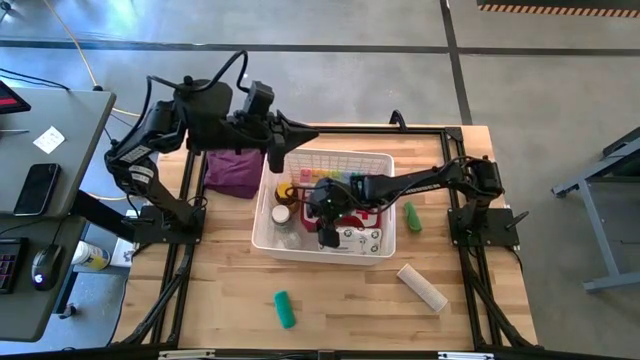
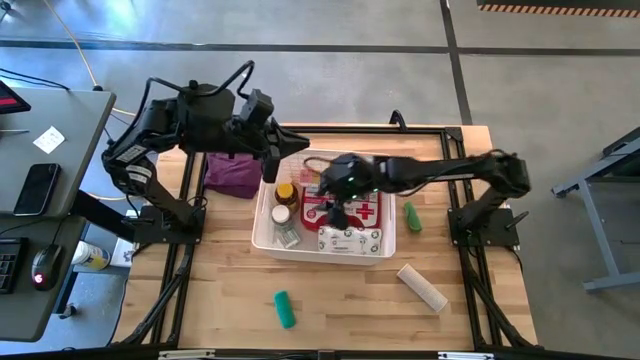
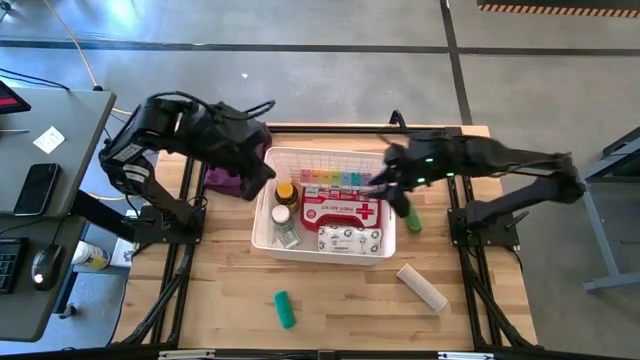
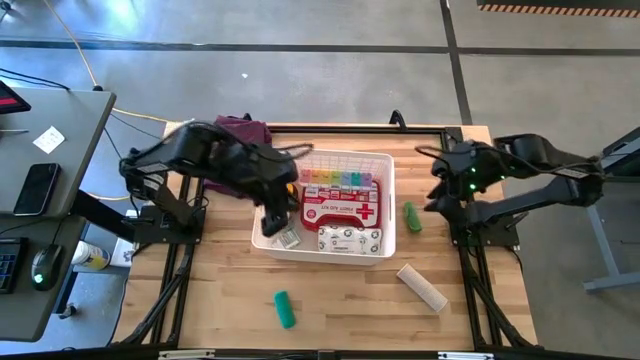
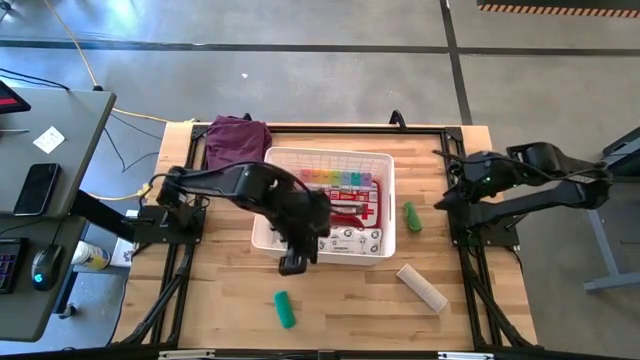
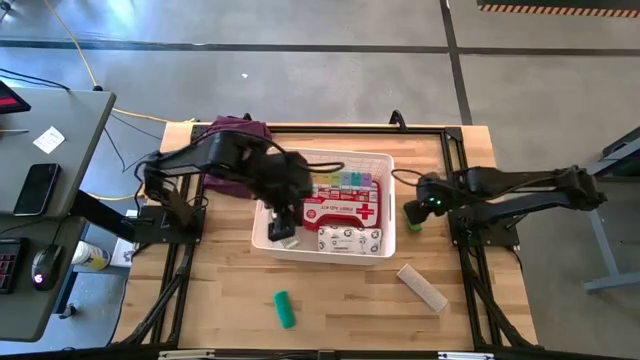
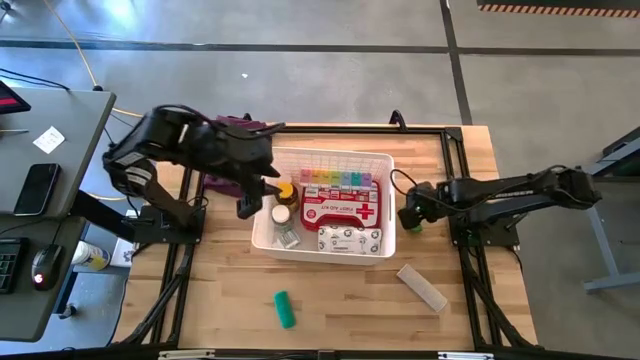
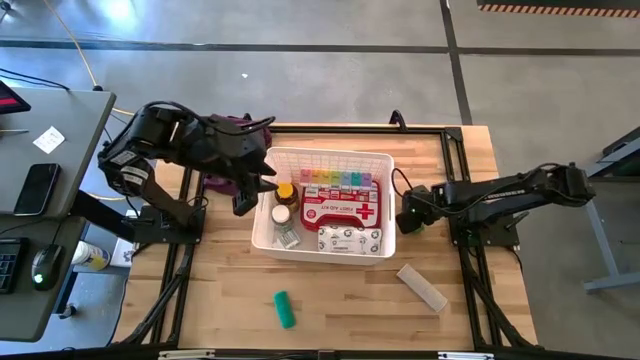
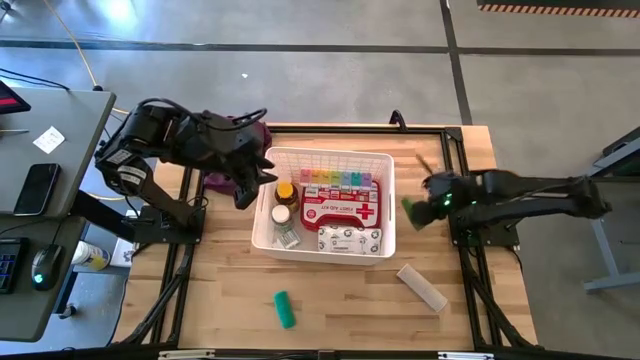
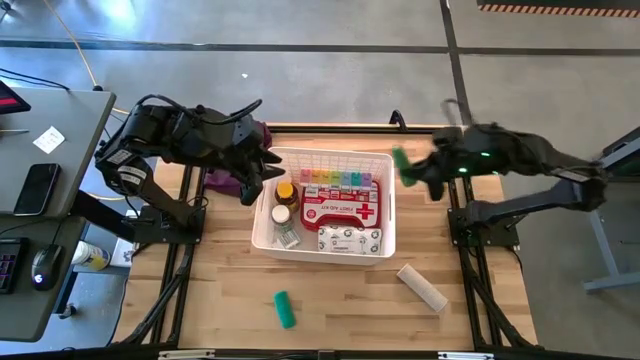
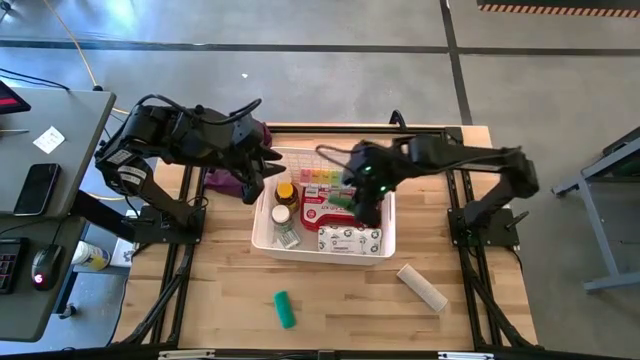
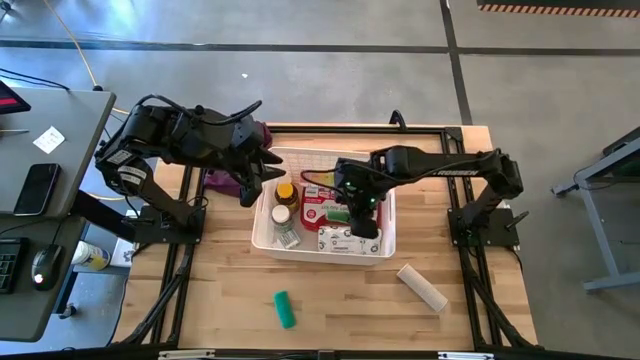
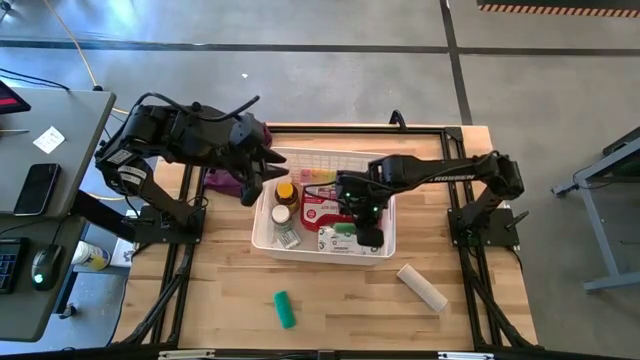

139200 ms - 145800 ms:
Task: Pick & place medical supplies in basket/bin
Put the light green bandage into the white bin

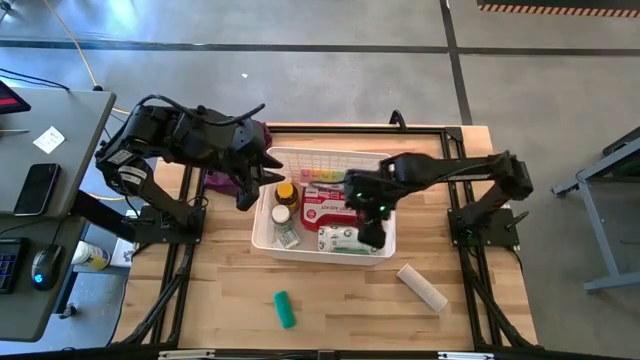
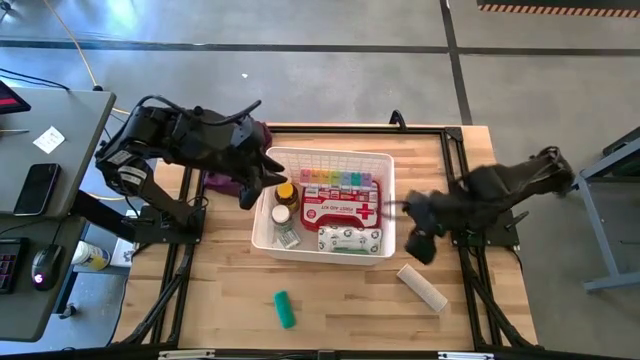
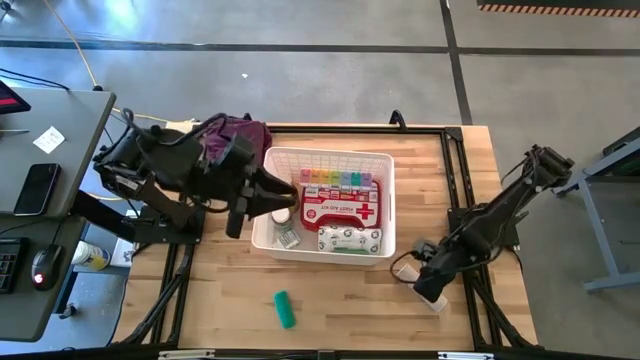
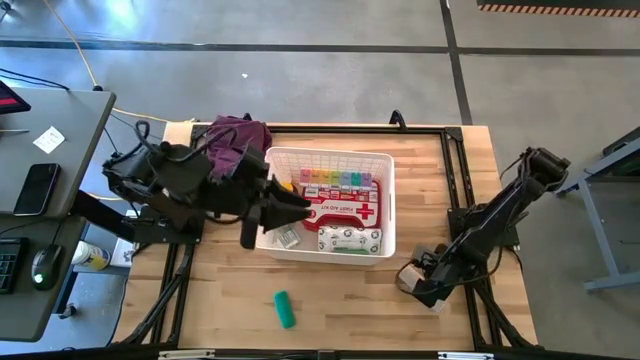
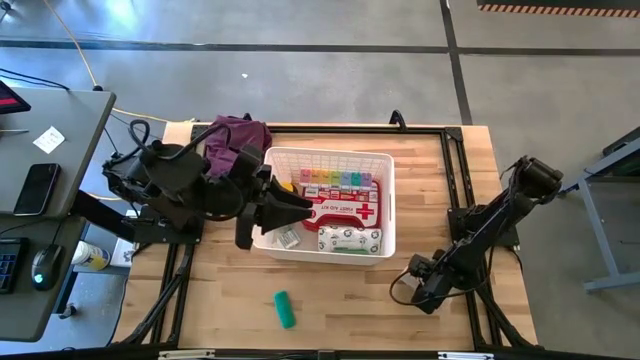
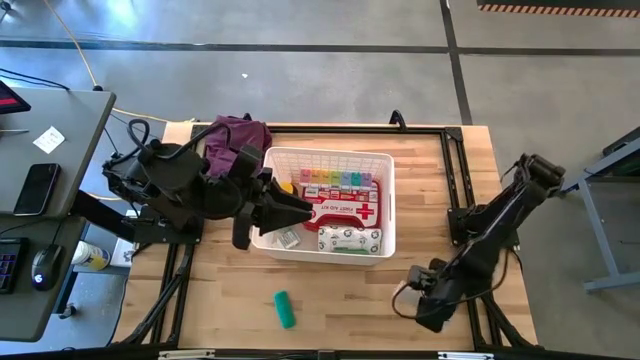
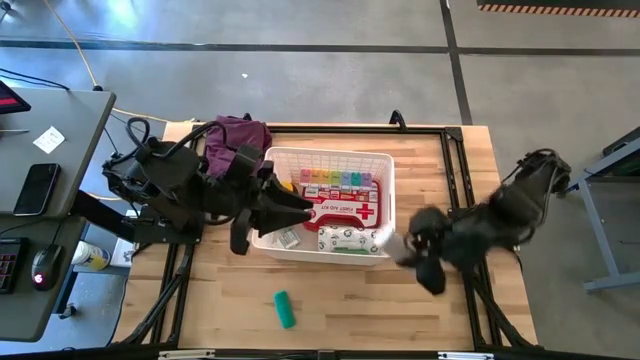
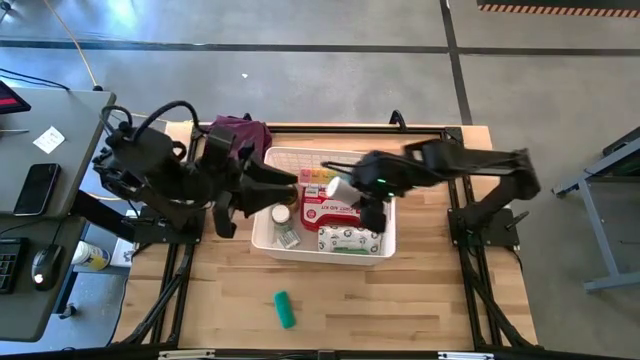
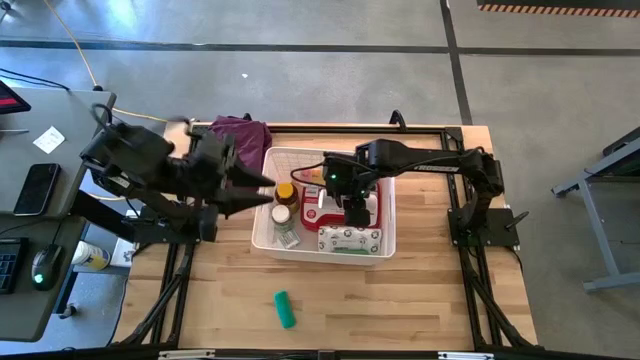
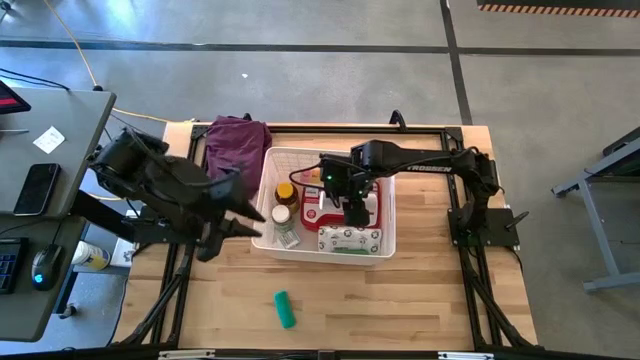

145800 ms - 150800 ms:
Put the white bandage into the white bin

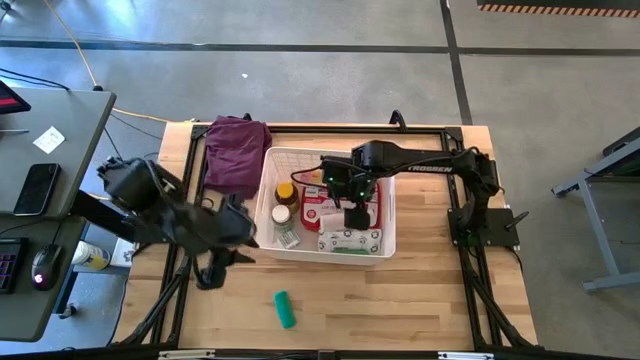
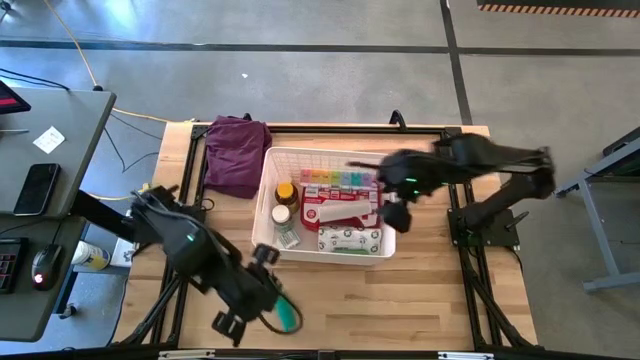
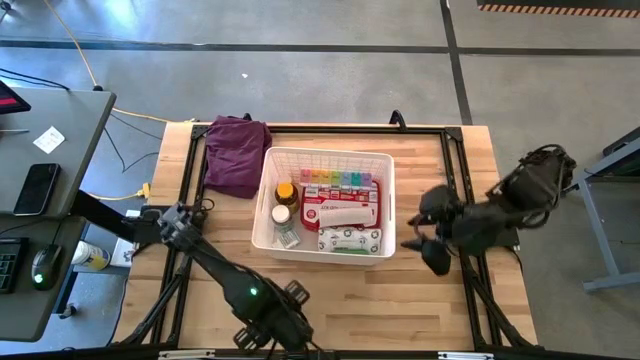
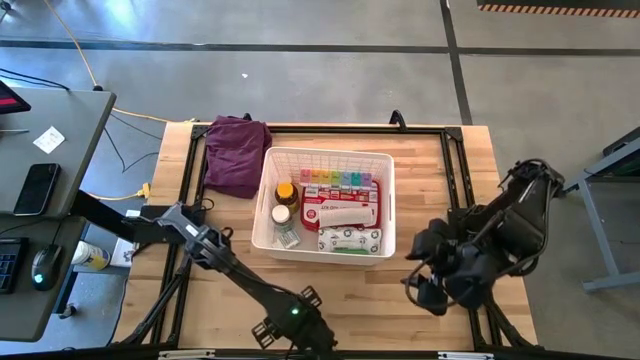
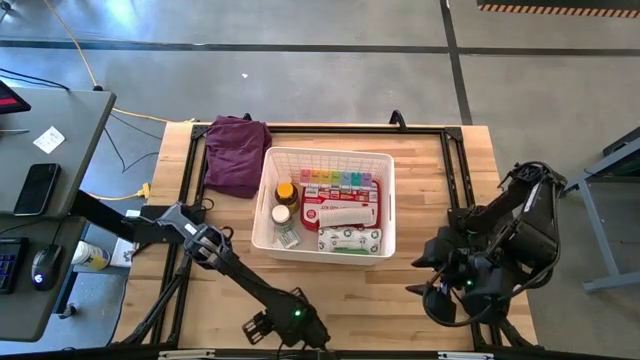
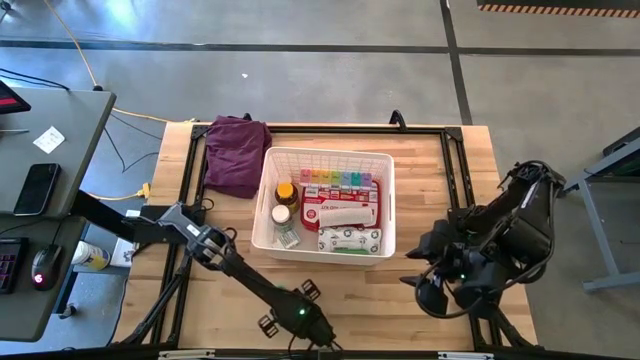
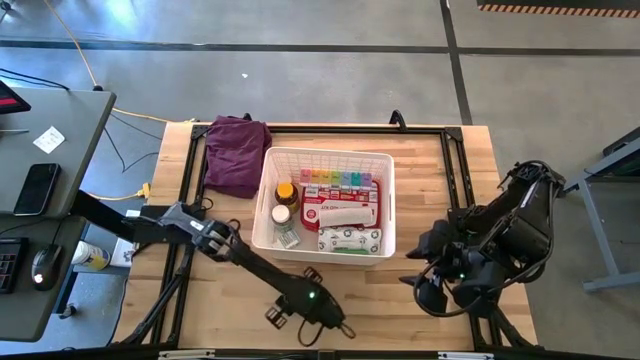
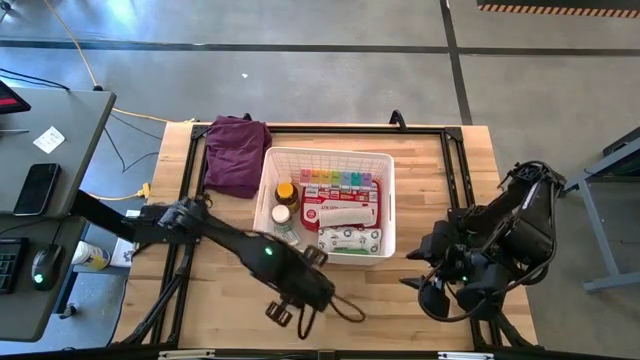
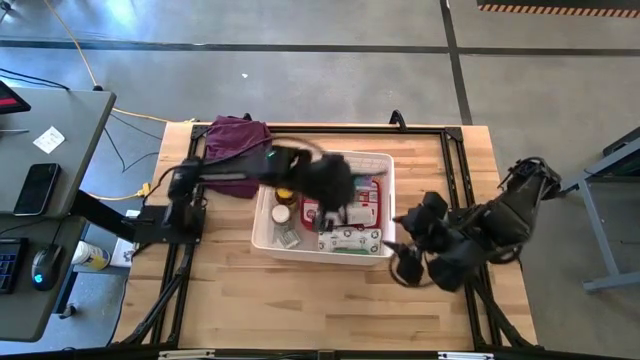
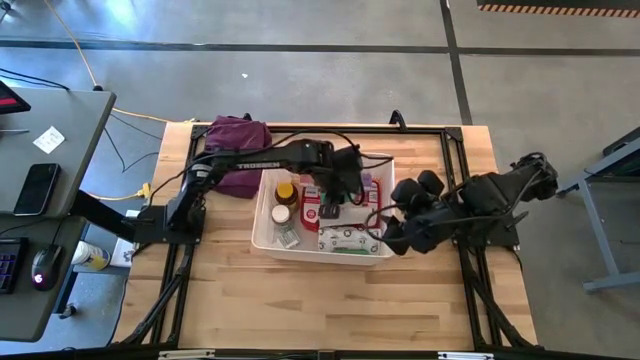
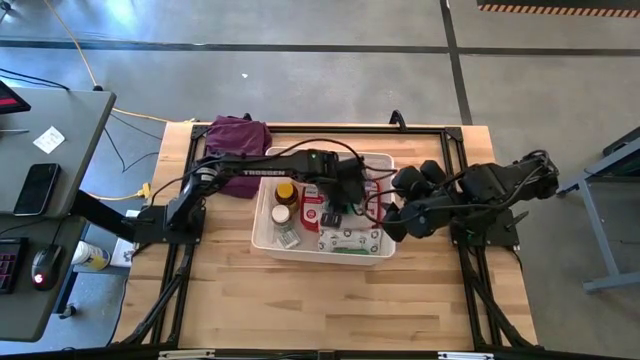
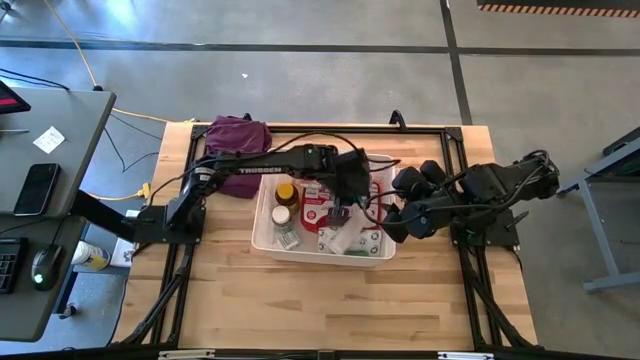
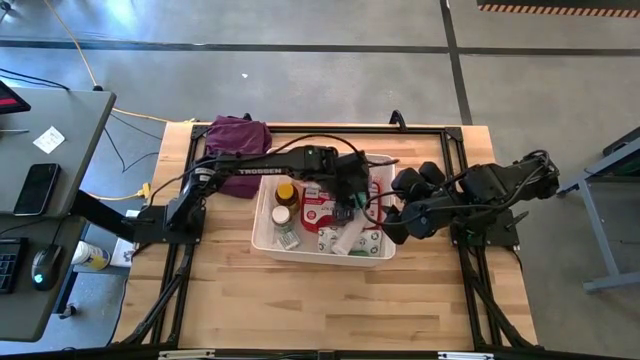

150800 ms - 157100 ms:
Put the green bandage into the white bin

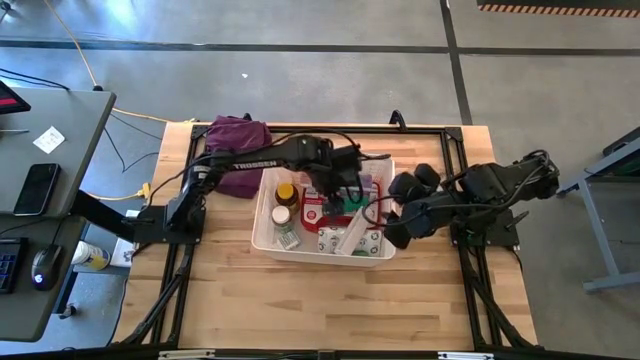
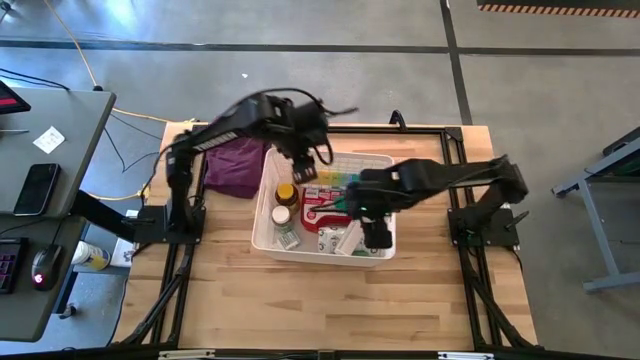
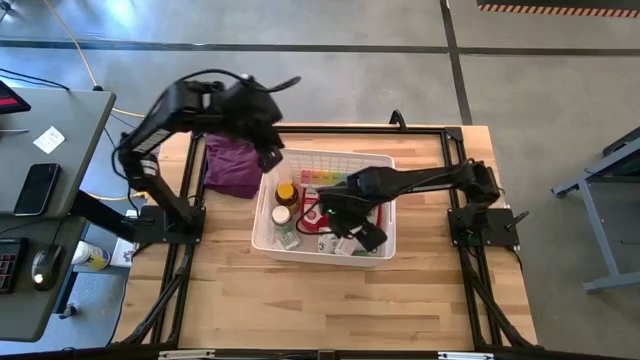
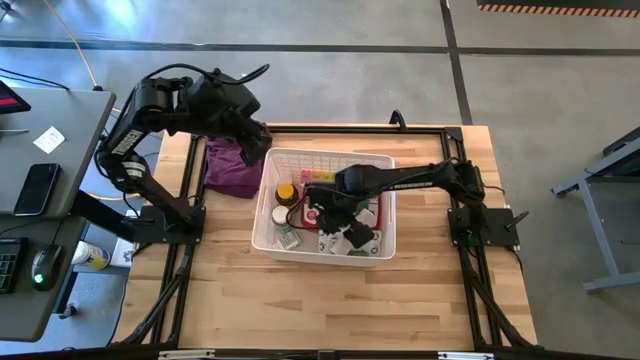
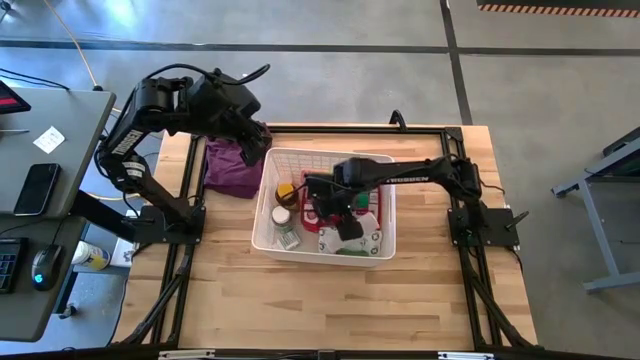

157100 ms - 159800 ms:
Adjust the white bandage in the white bin

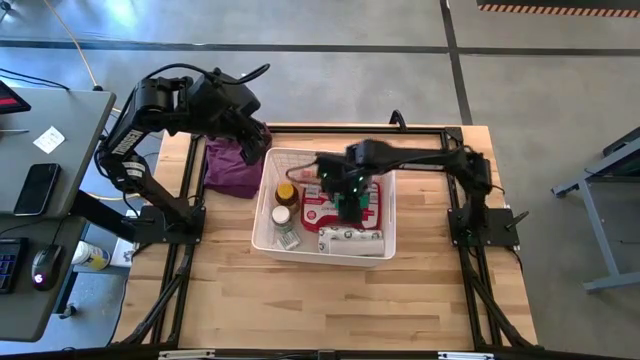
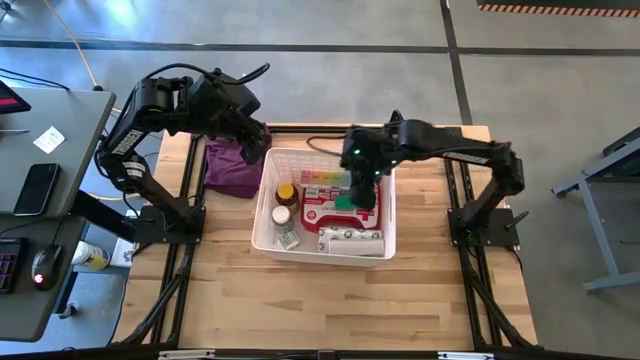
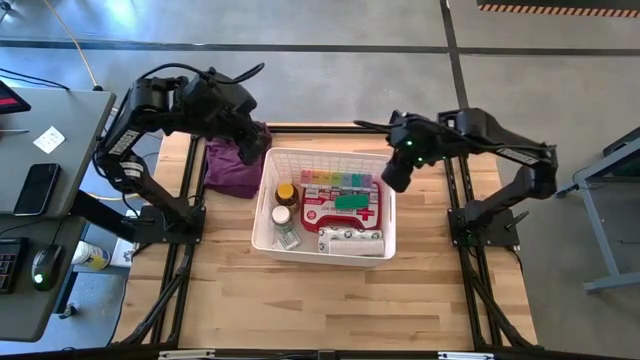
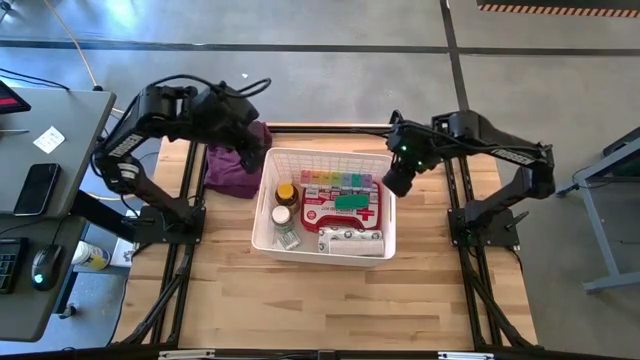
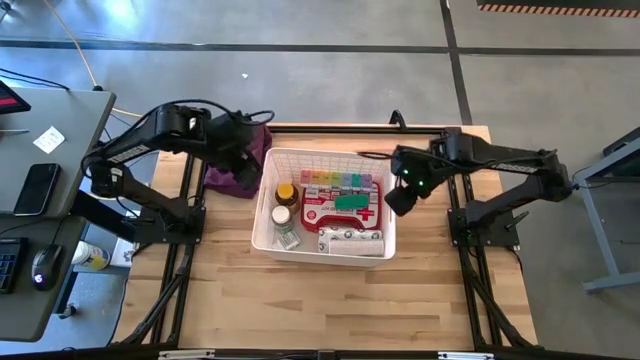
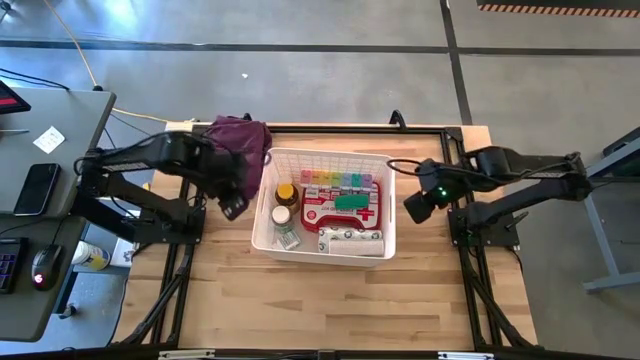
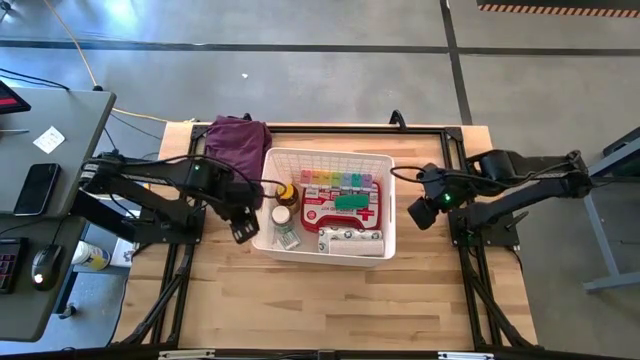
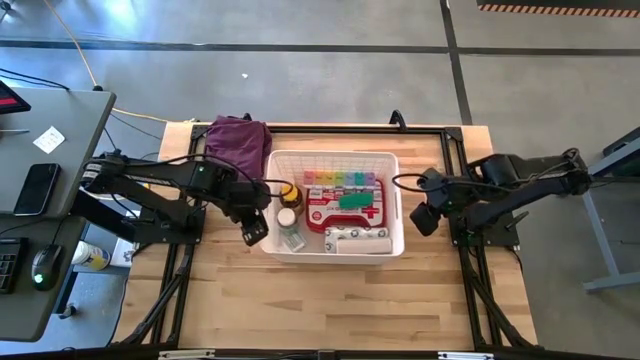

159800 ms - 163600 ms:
Adjust the white bin
